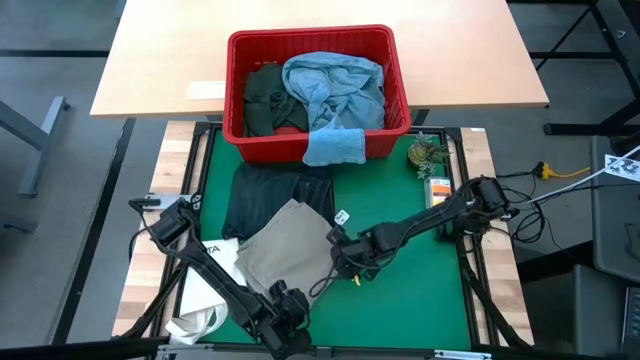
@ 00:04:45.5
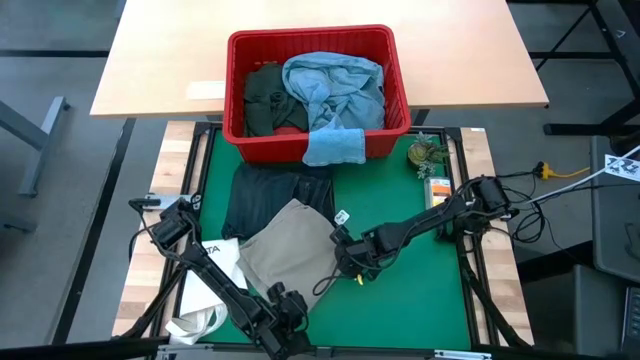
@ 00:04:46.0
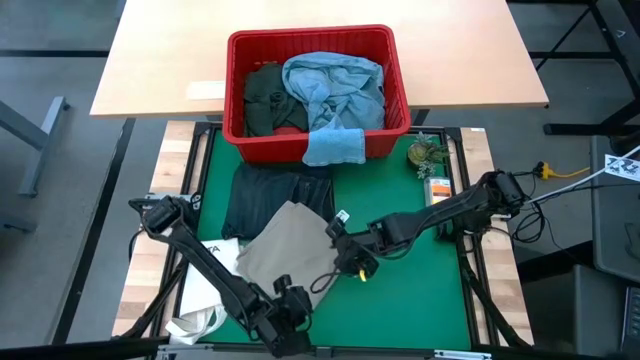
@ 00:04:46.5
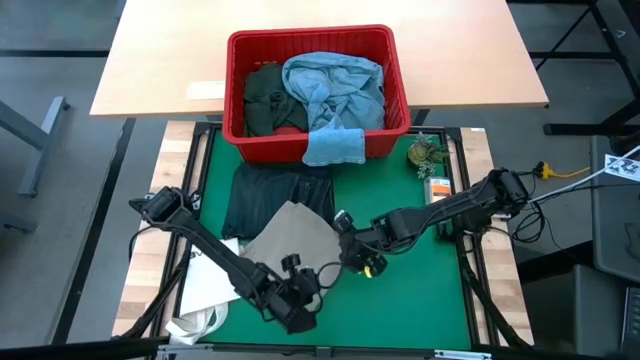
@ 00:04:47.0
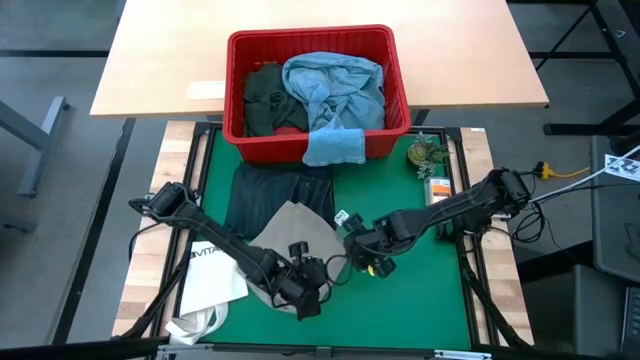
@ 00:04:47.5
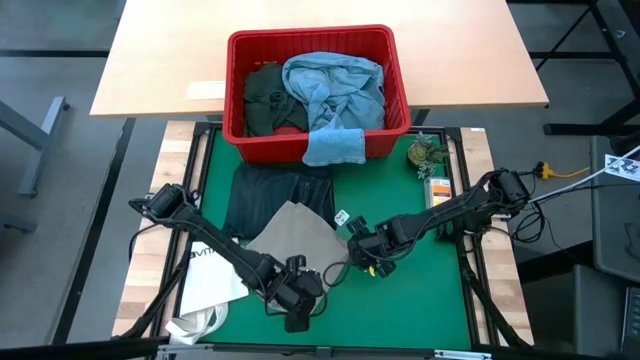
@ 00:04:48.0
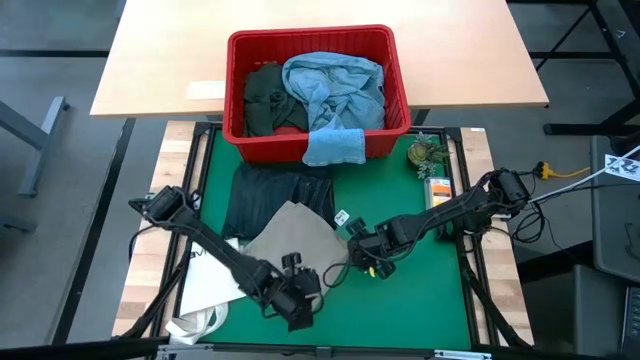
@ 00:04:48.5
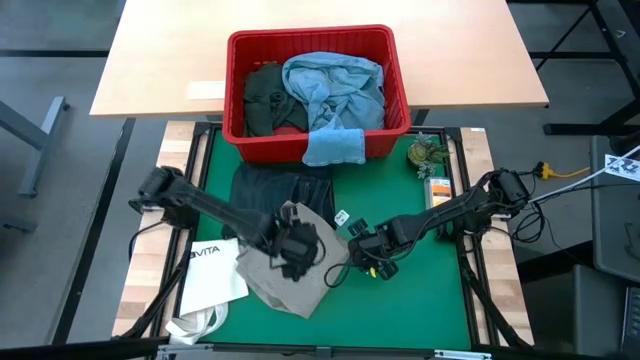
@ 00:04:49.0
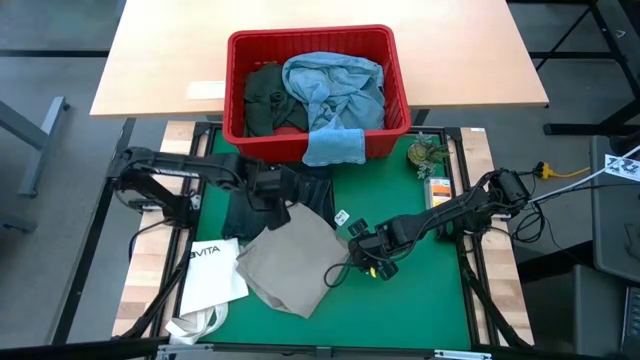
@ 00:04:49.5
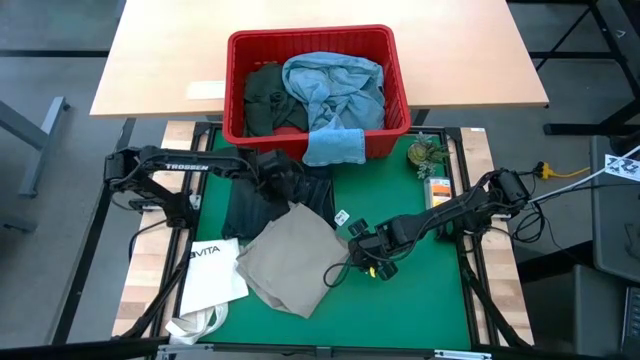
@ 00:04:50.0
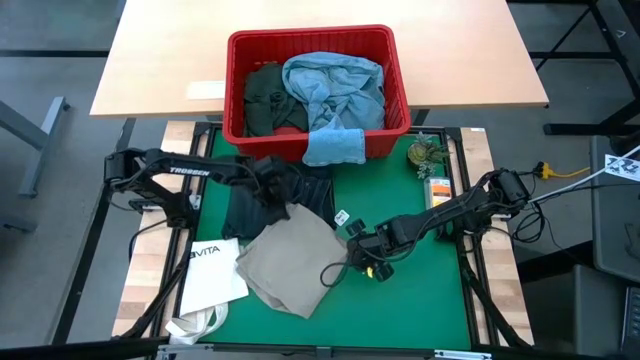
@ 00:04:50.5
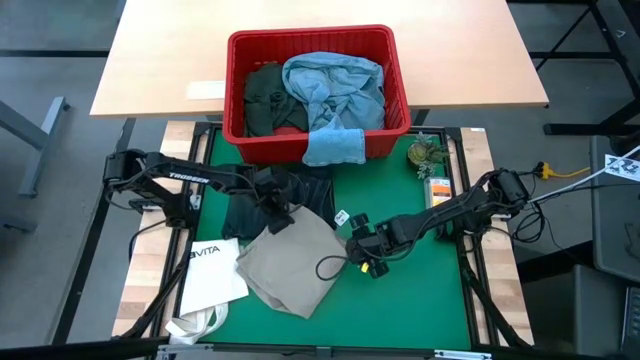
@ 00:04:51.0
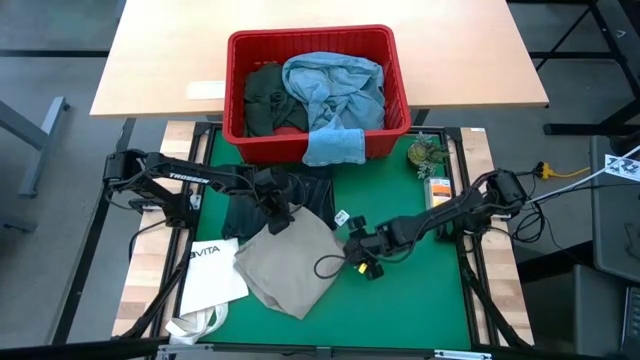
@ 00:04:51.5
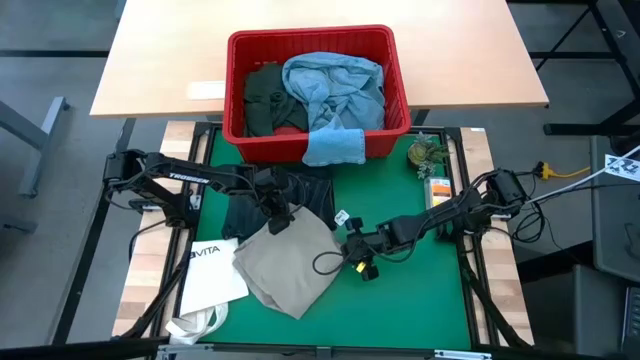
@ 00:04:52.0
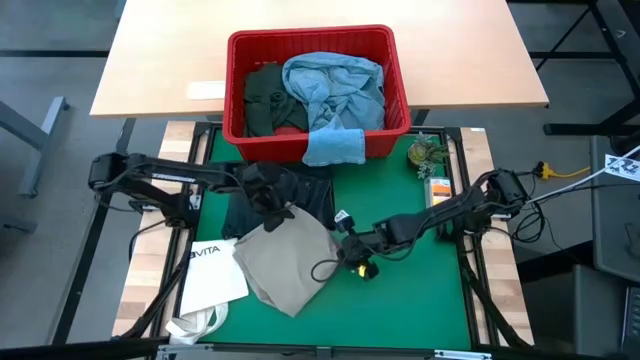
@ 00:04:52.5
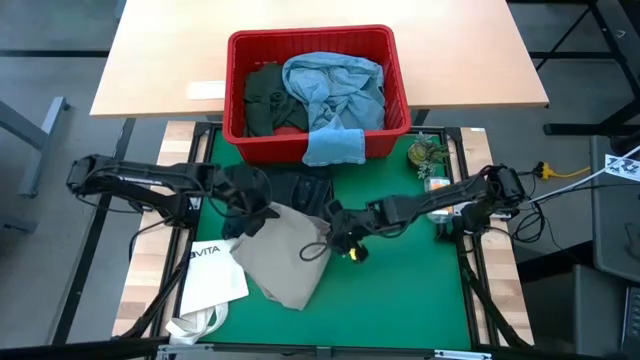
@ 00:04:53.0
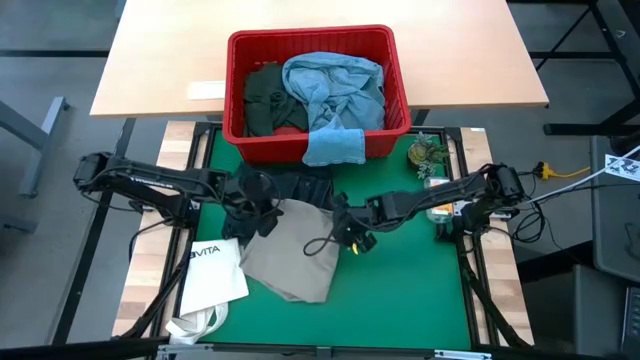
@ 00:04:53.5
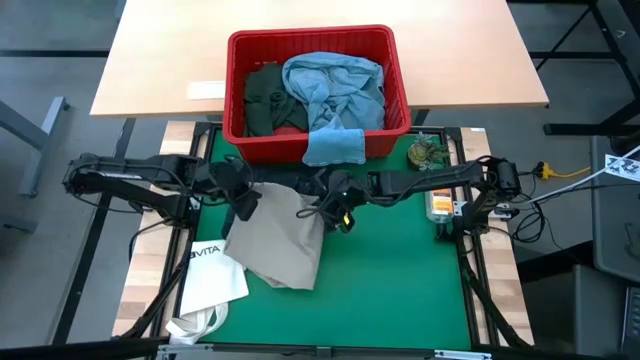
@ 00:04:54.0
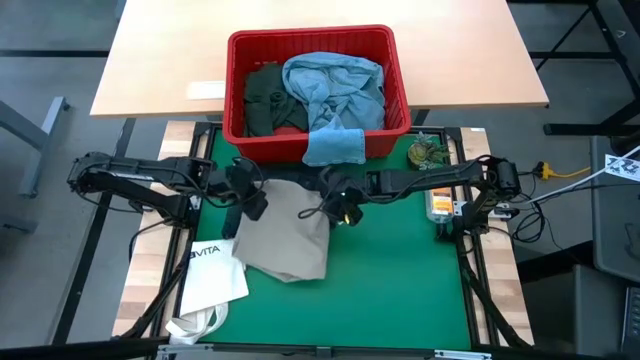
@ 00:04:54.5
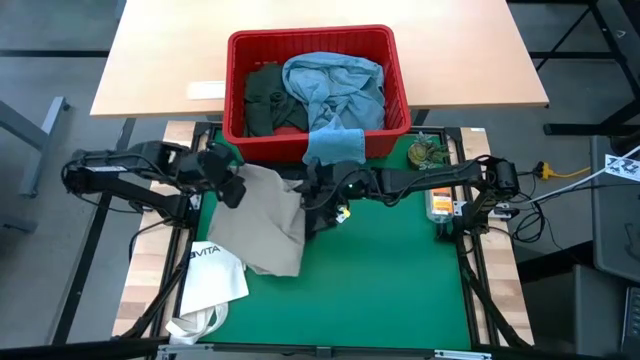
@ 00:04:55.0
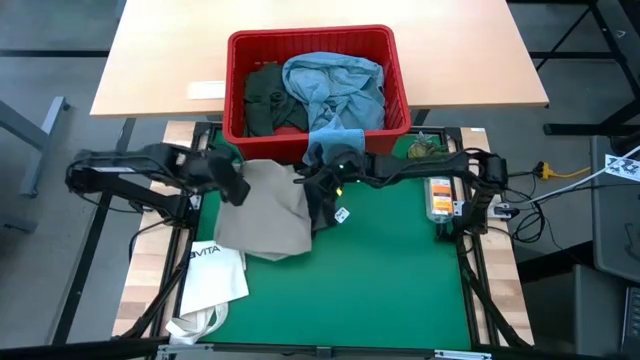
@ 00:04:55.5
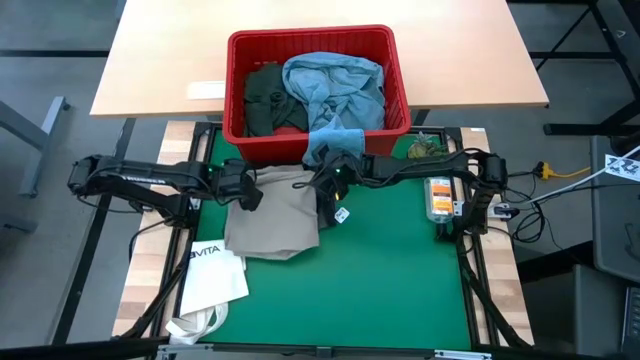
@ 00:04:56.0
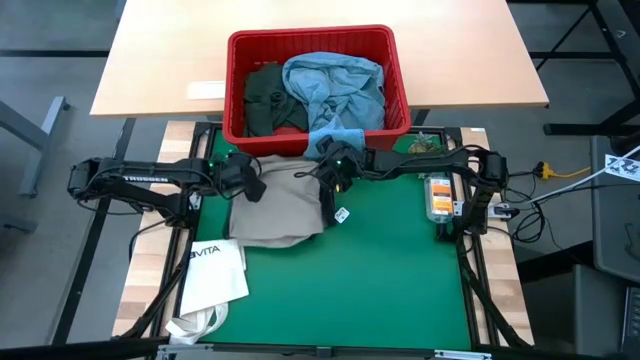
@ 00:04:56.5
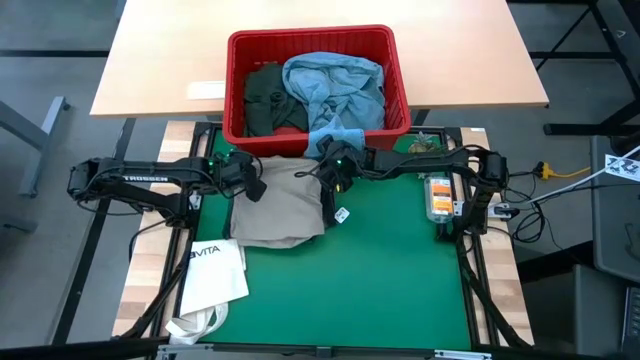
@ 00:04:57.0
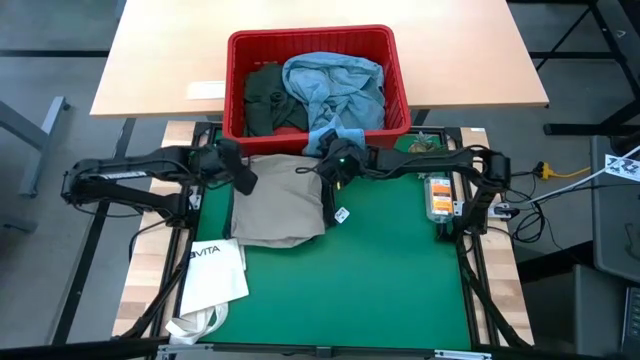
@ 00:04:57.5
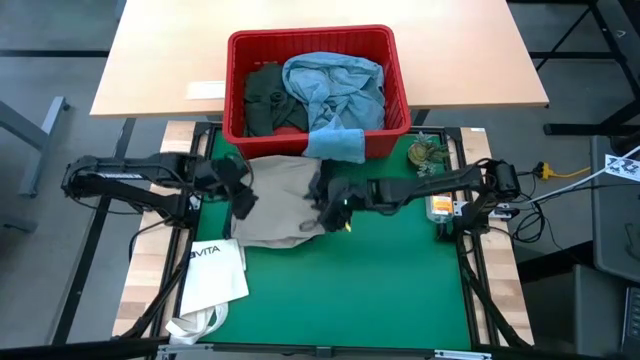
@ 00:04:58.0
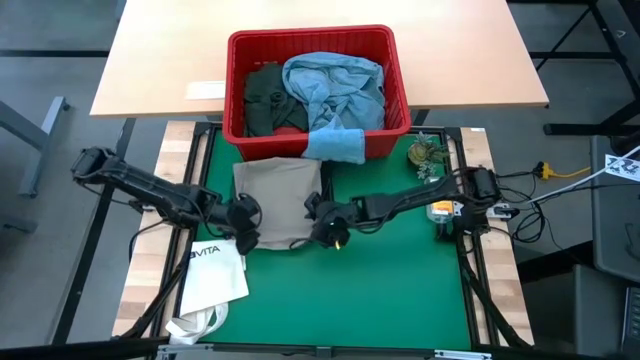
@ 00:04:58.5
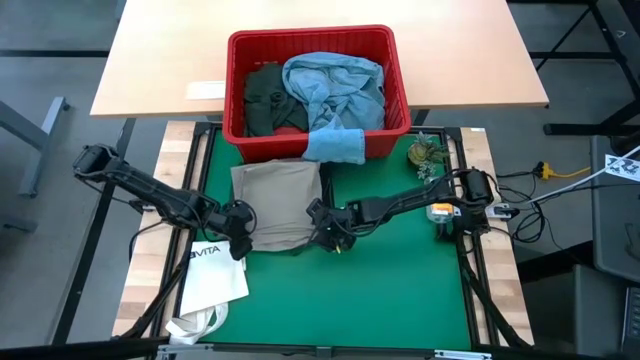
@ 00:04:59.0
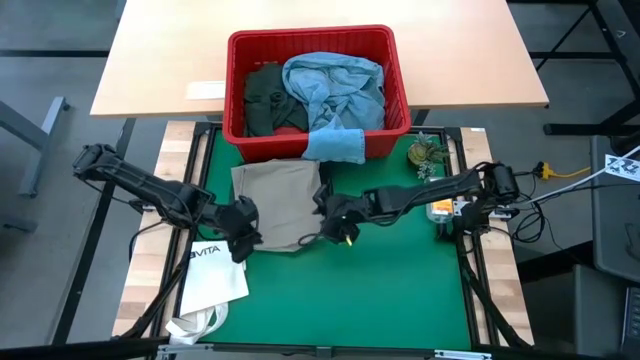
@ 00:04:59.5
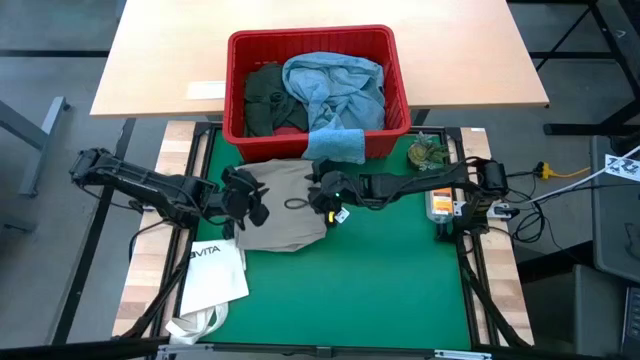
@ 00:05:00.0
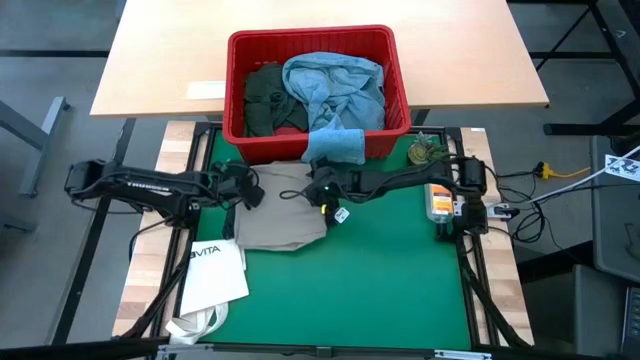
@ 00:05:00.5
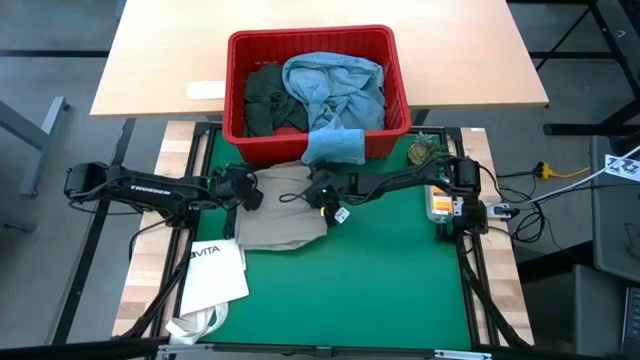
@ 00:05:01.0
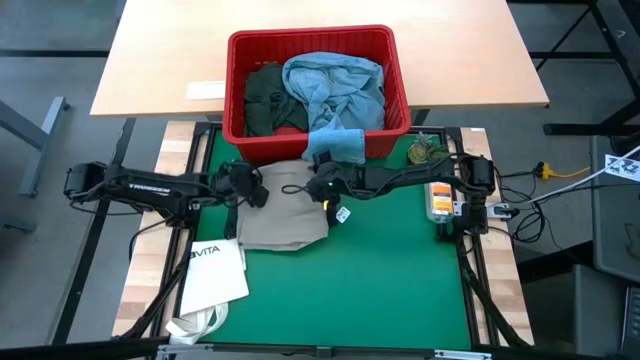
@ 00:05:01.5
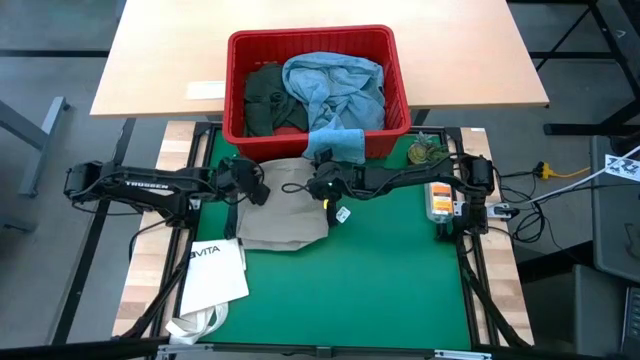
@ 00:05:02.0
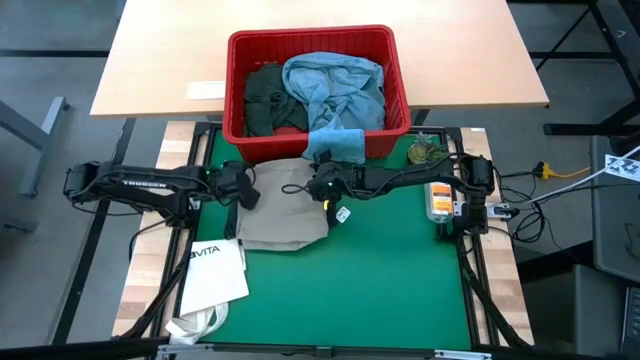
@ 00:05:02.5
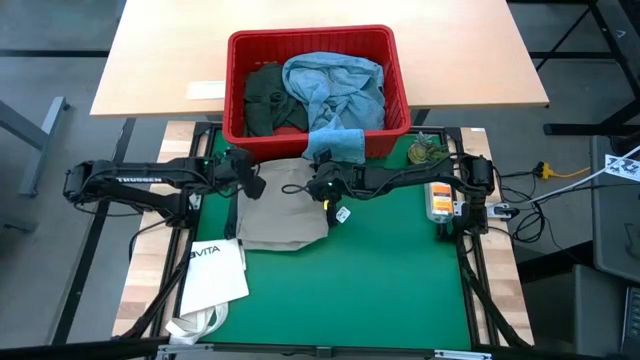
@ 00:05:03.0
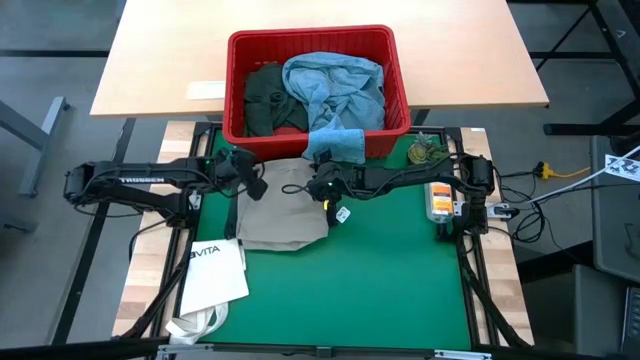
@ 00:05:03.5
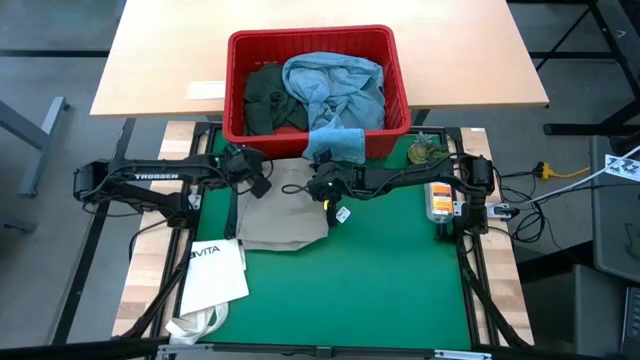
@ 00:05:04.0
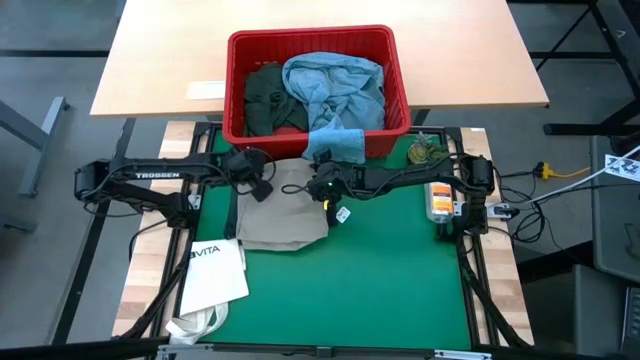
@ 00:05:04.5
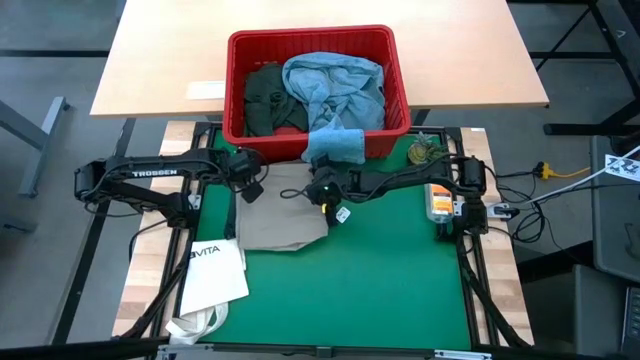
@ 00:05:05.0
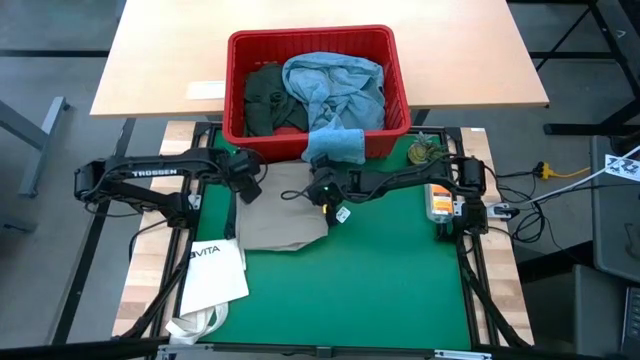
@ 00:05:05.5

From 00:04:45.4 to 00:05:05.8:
Task: Fold Laundry from Bin
Stack the folded brown shorts on top of the folded dark blue pants

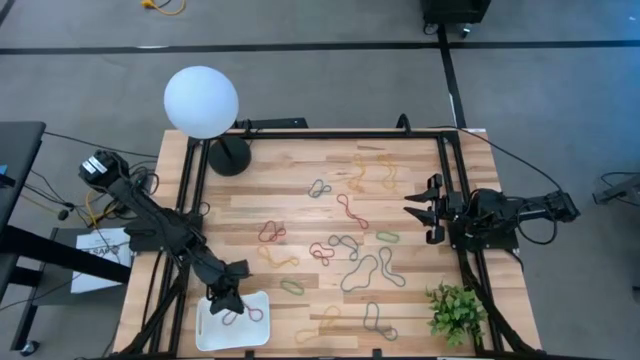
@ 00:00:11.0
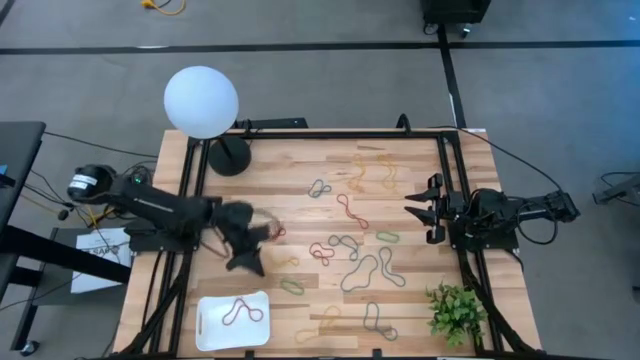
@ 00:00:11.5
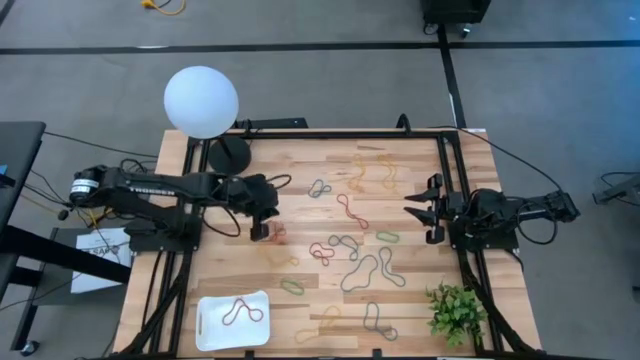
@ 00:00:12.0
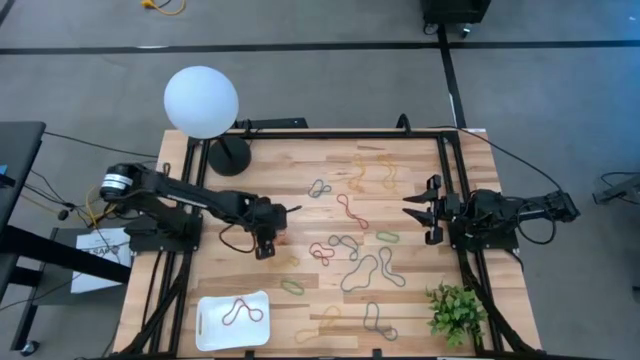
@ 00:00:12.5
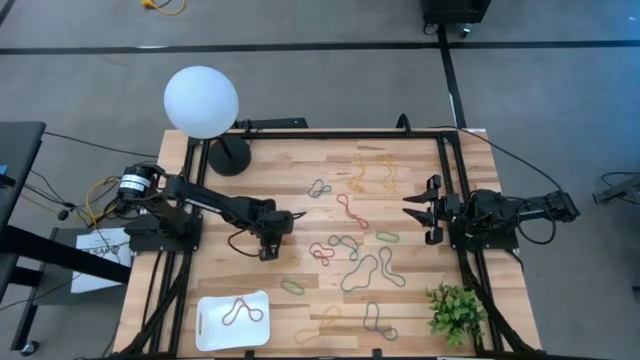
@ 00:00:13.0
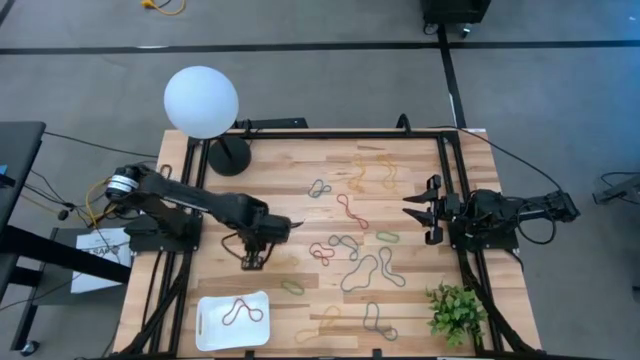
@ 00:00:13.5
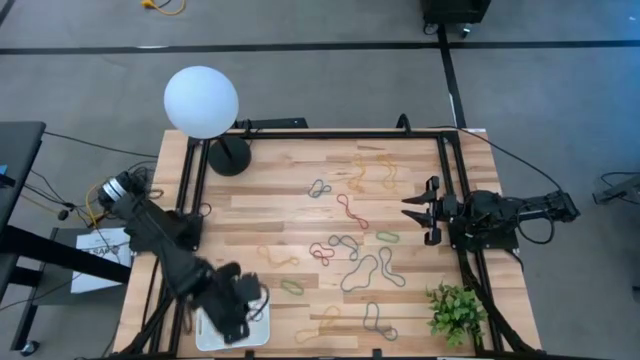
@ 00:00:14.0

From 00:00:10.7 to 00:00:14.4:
Task: Pick and place items into bin
Put the red rubber band into the bin
